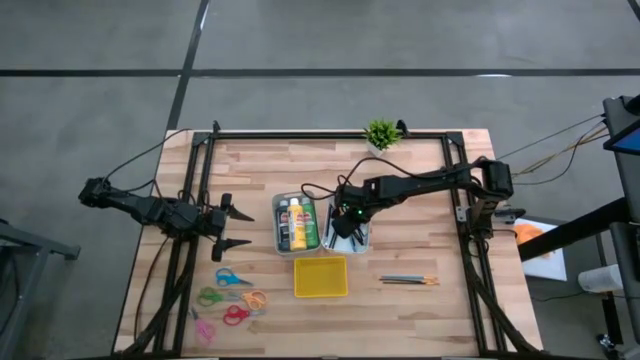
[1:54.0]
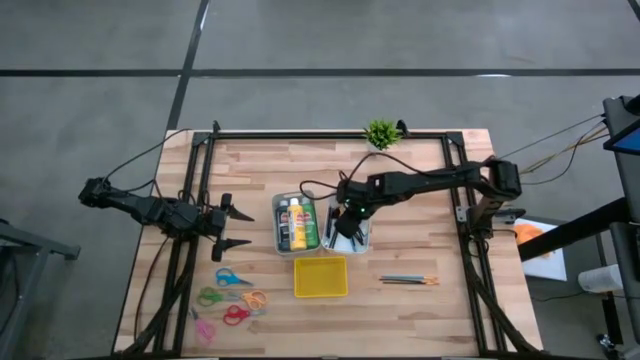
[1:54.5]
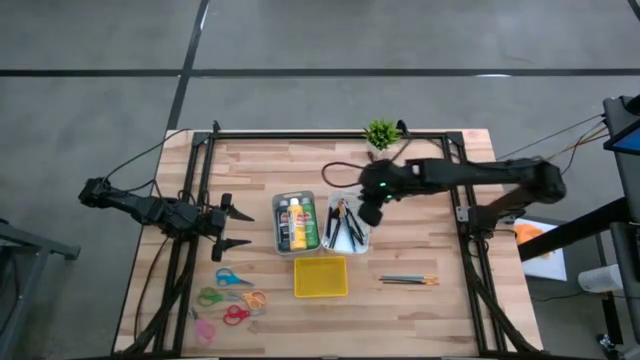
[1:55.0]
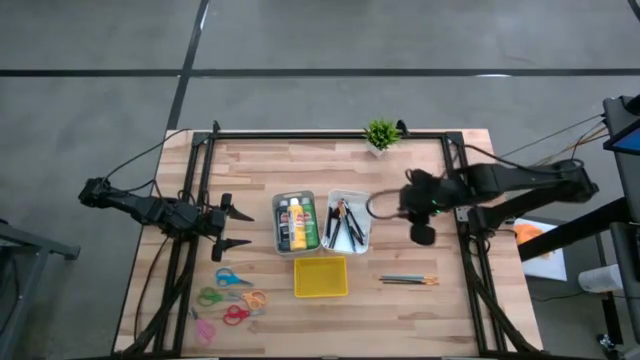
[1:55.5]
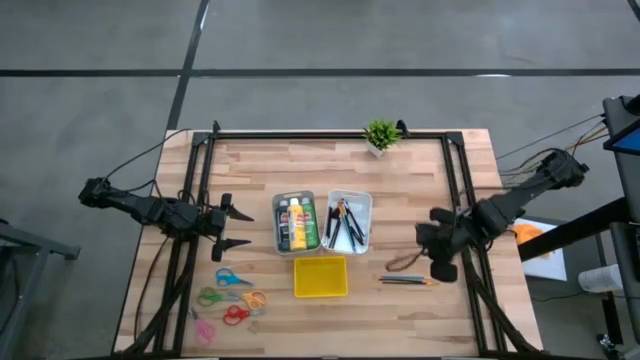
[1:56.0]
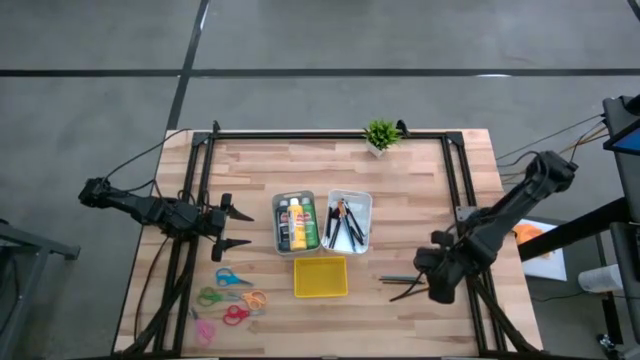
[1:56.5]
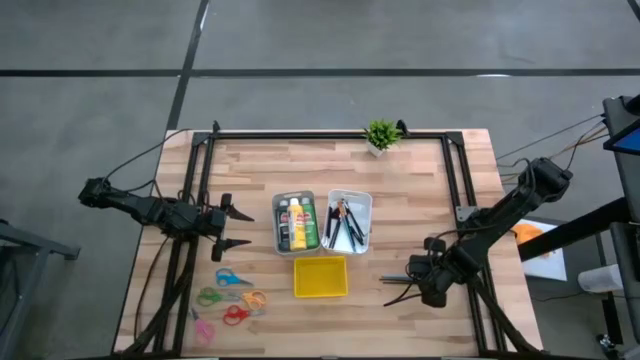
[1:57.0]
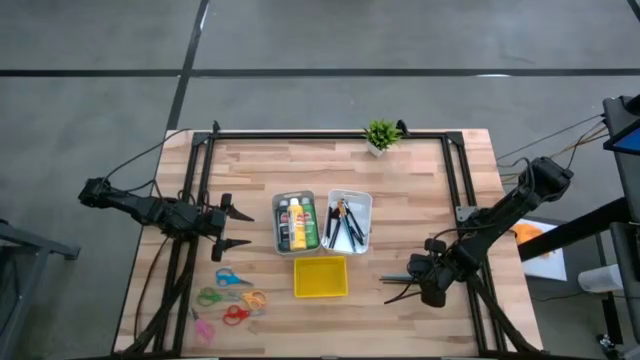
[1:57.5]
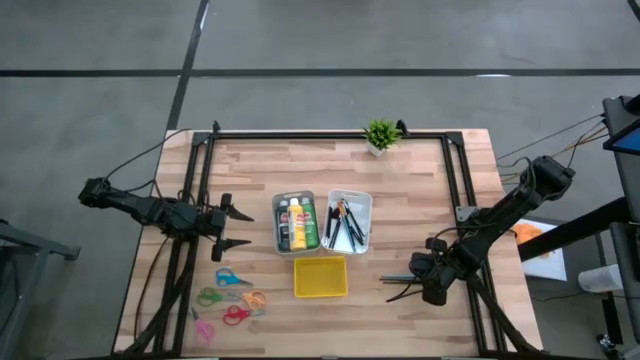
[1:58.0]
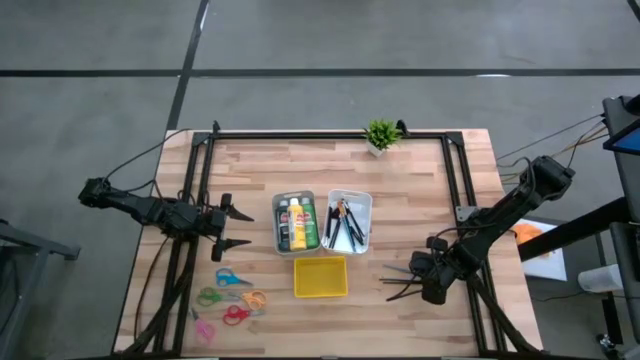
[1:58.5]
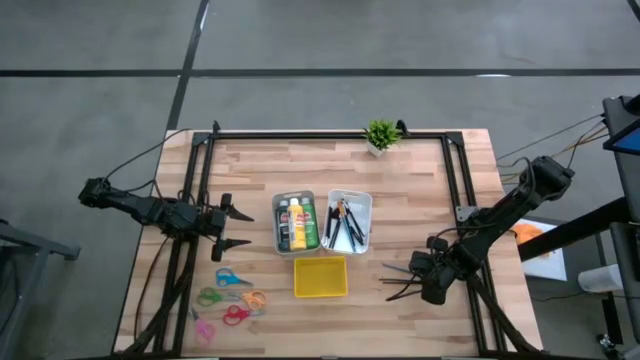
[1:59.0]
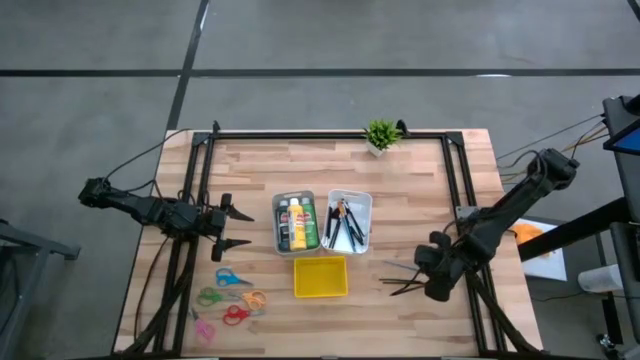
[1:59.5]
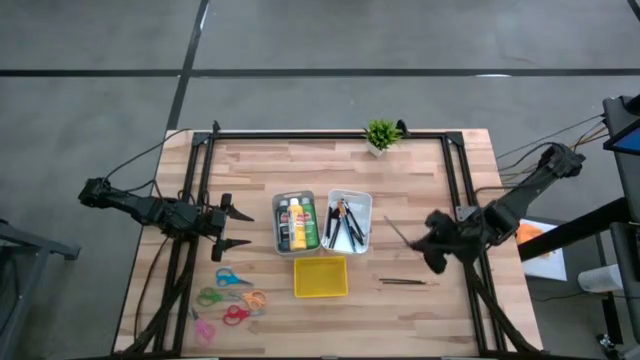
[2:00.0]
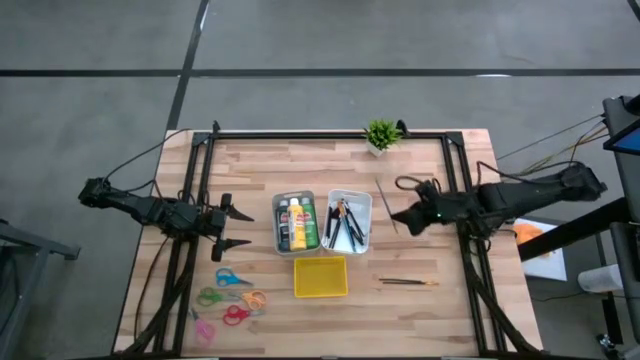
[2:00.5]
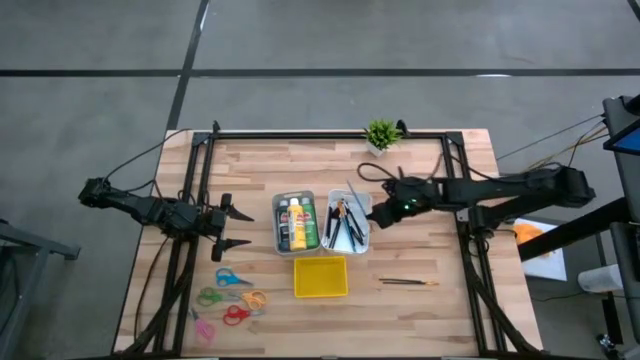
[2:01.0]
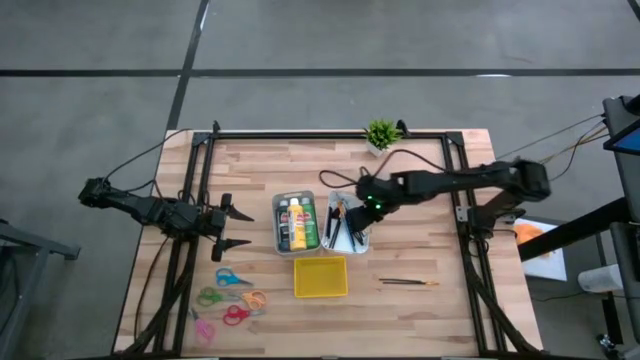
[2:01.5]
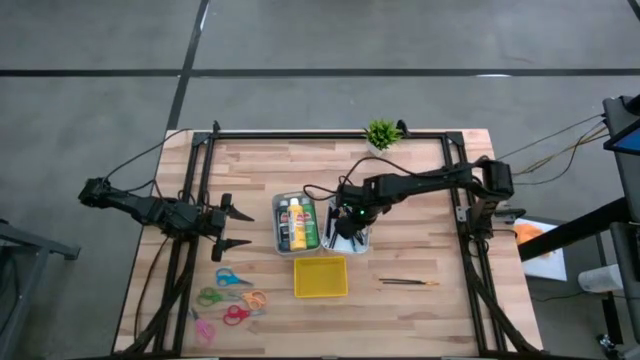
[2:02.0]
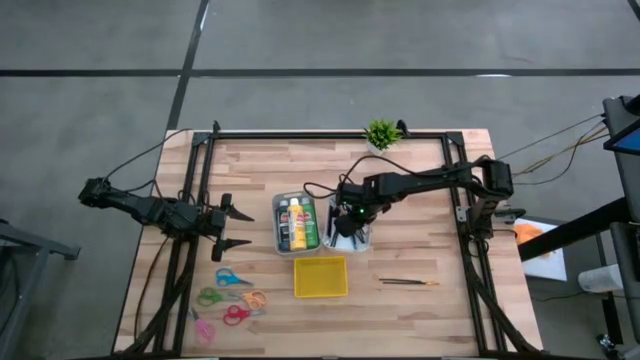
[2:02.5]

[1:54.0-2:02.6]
Task: Pick & Place Paint Supplies
Put the gold paint brush into the white bin

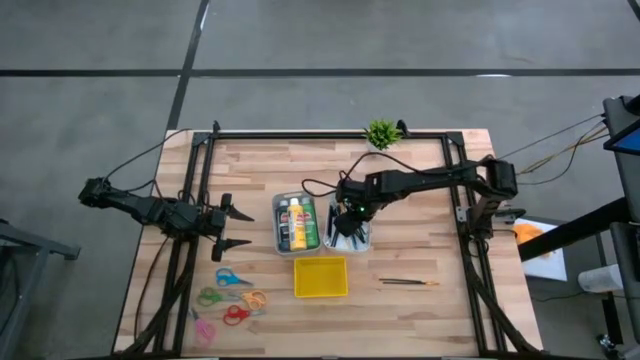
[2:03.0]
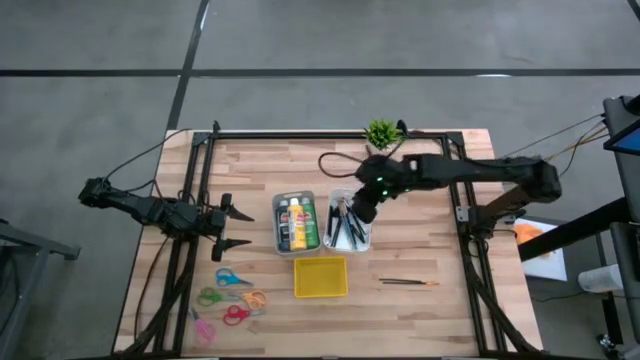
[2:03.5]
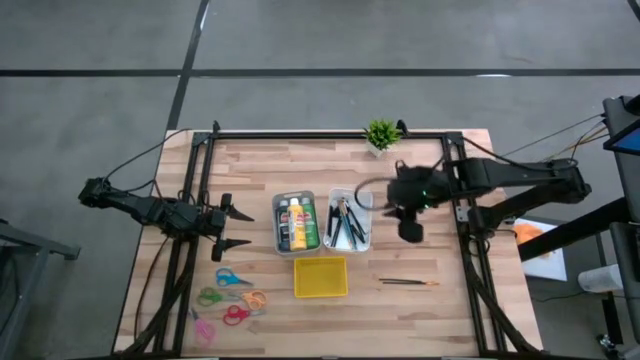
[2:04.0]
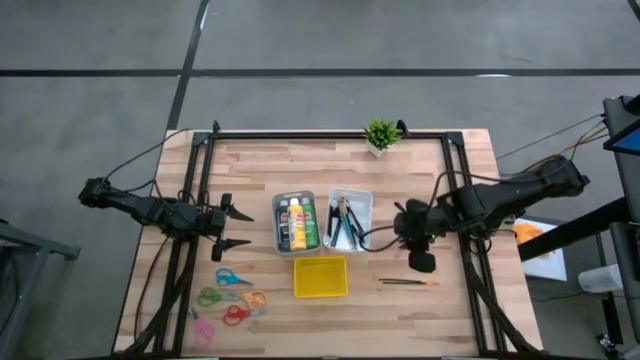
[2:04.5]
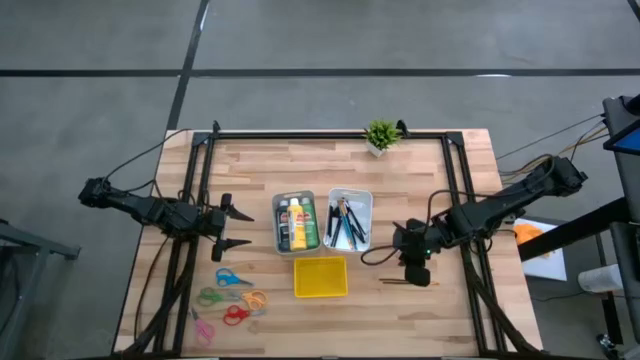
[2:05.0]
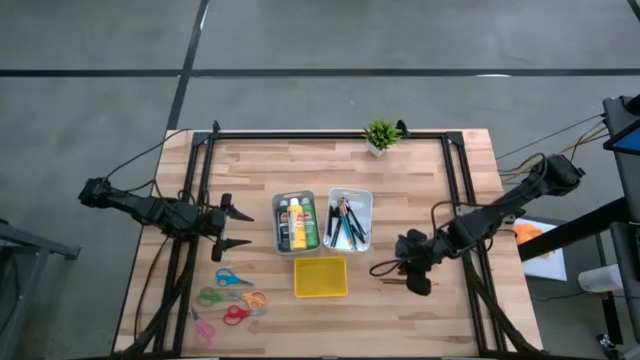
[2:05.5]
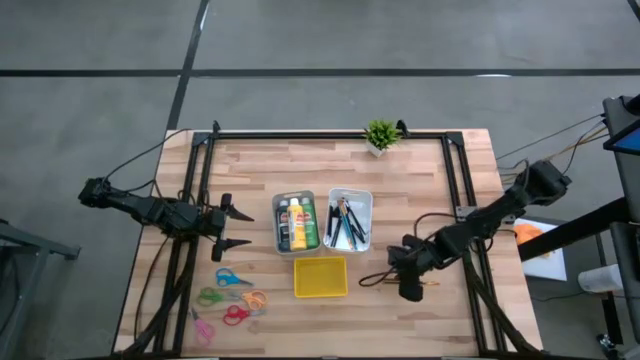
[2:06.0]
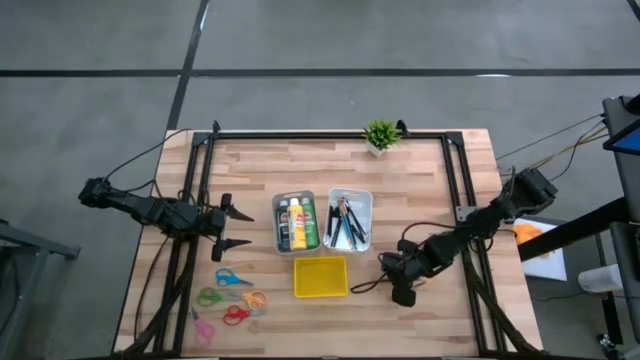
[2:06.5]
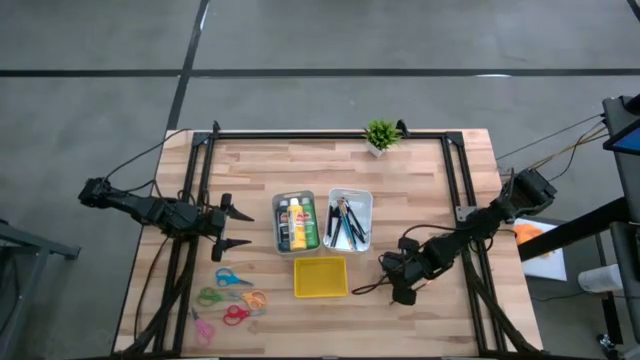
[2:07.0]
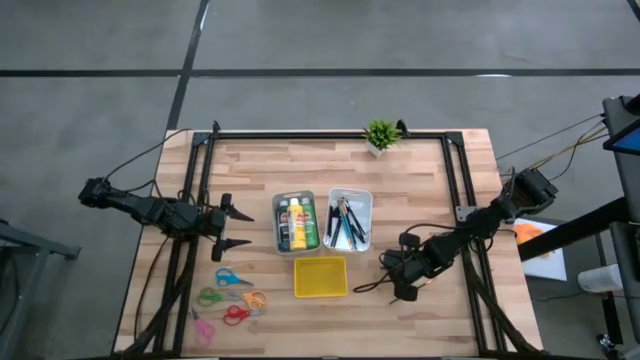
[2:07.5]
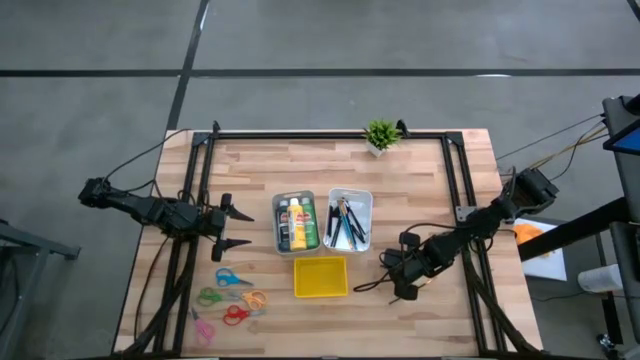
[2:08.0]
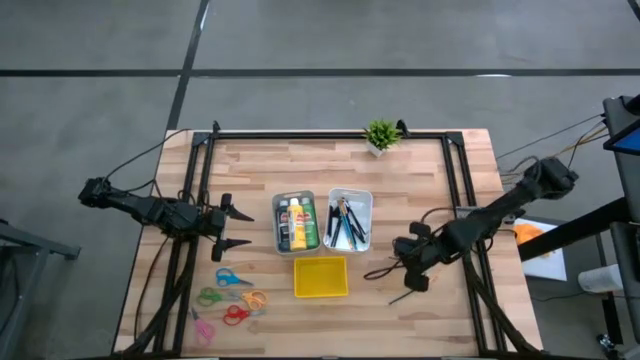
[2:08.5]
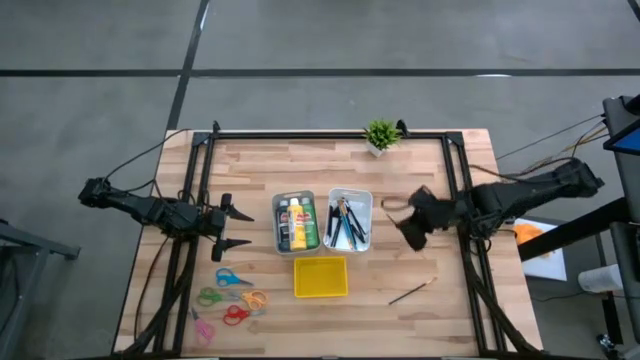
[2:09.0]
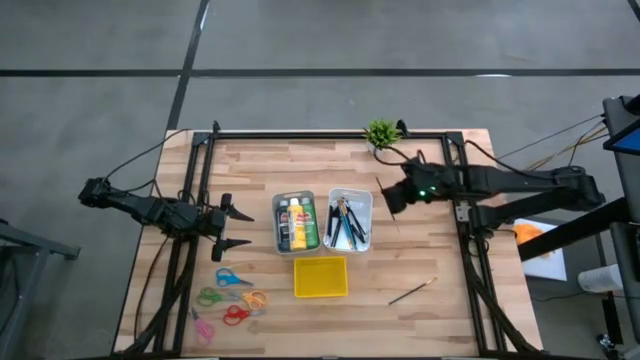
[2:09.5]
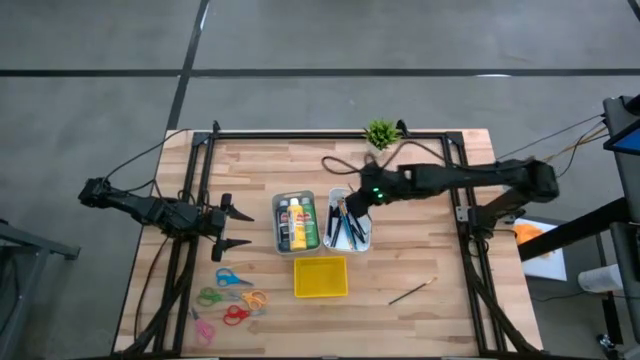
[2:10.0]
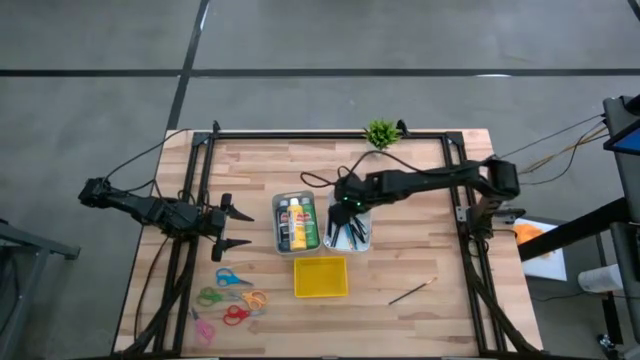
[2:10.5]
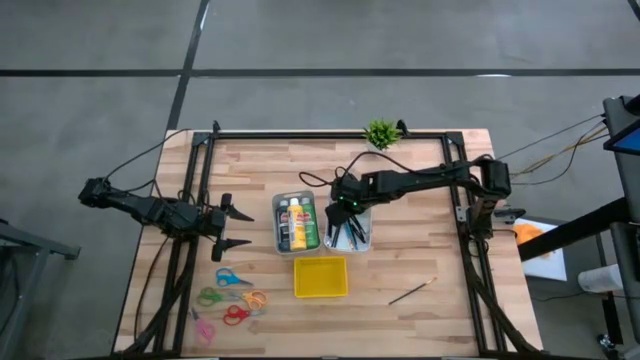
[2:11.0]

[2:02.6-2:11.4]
Put the gold paint brush into the white bin

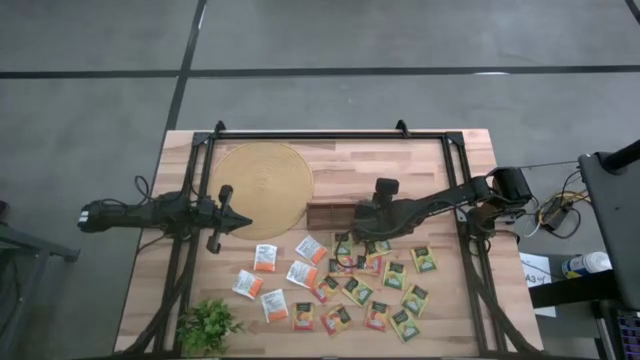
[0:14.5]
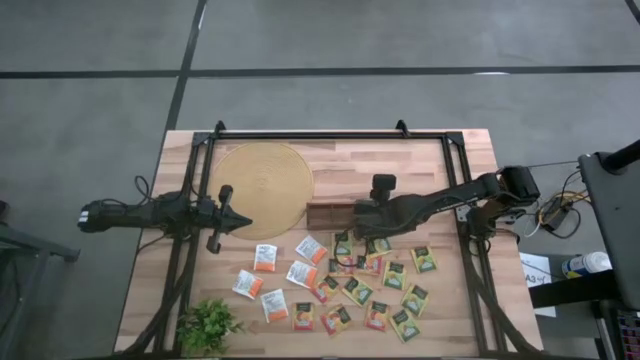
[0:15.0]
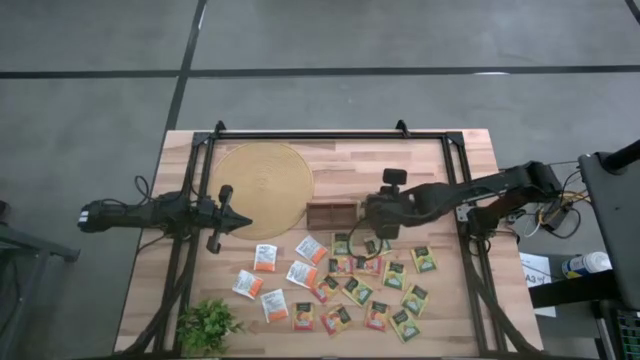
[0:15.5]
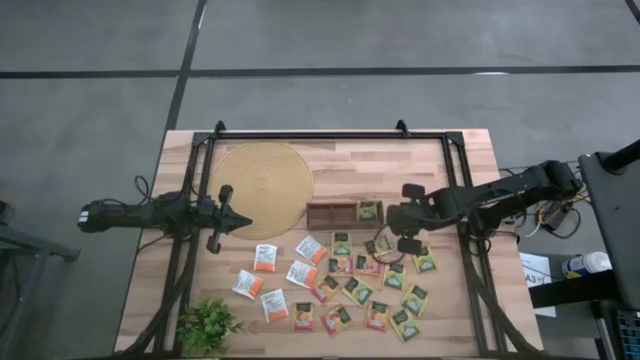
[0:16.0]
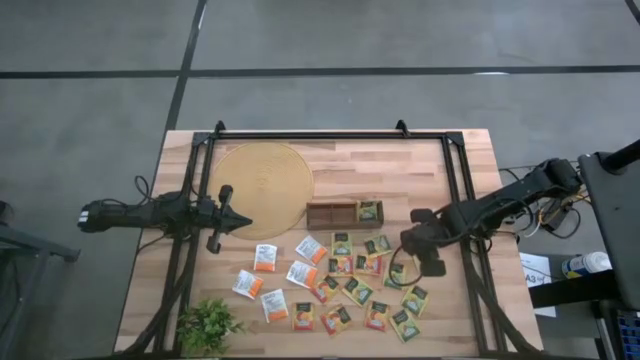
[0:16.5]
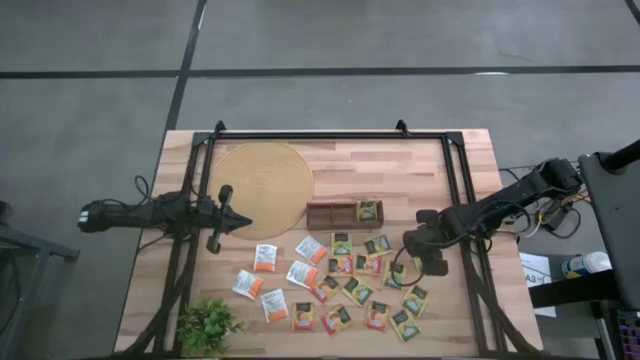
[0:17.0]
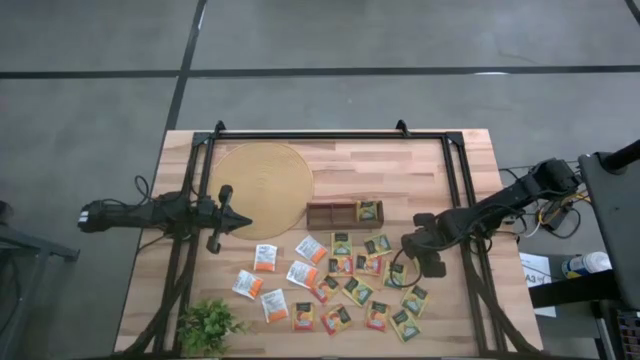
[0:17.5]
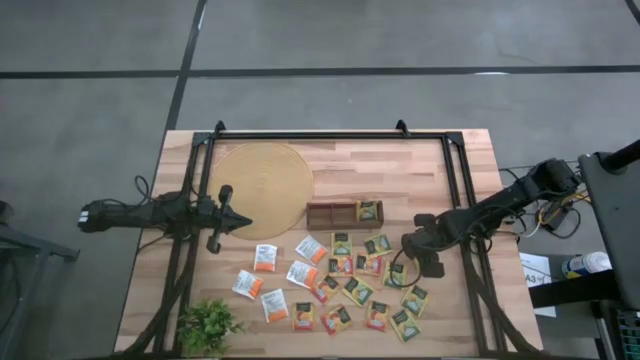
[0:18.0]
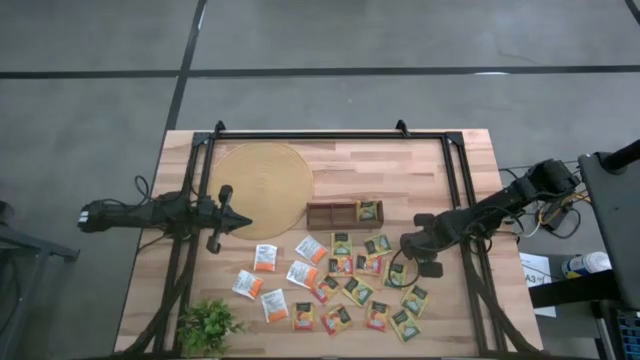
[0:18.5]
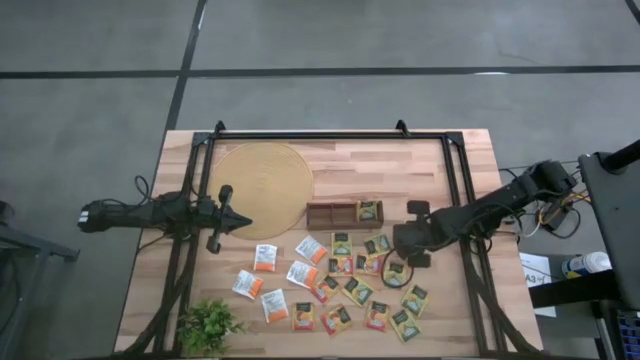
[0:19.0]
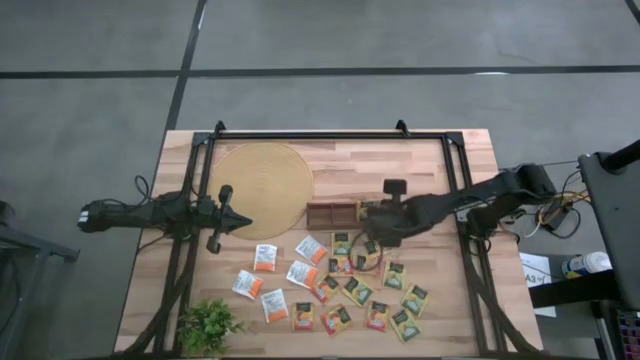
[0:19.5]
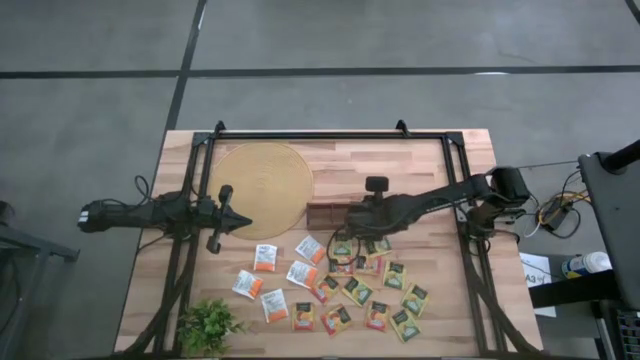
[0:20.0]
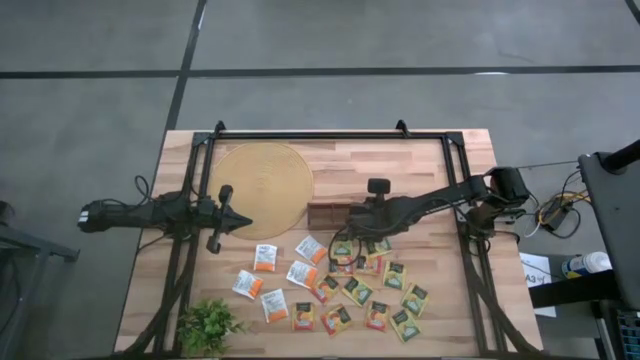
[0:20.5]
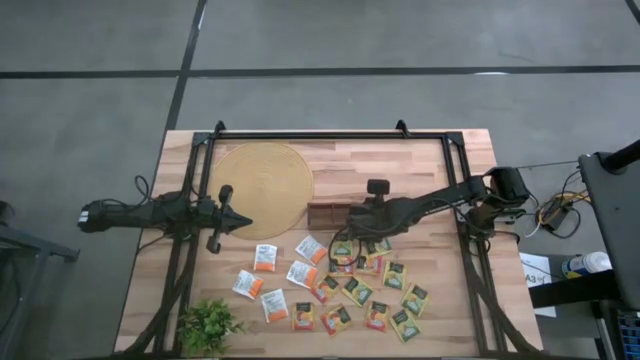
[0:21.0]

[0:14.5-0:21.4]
Task: Pick & Place Tea
Put the yellow tea bag into the right section of the wooden organizer
